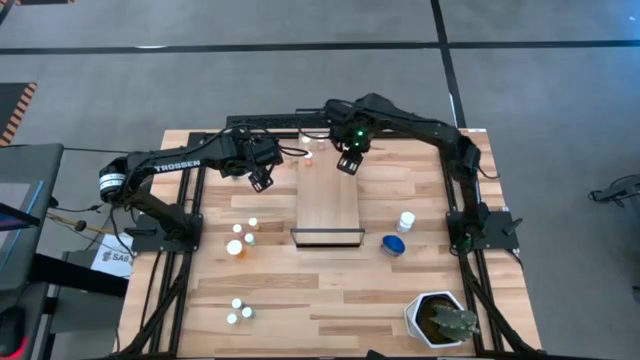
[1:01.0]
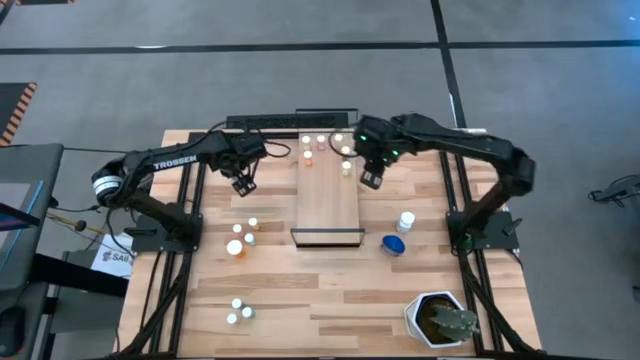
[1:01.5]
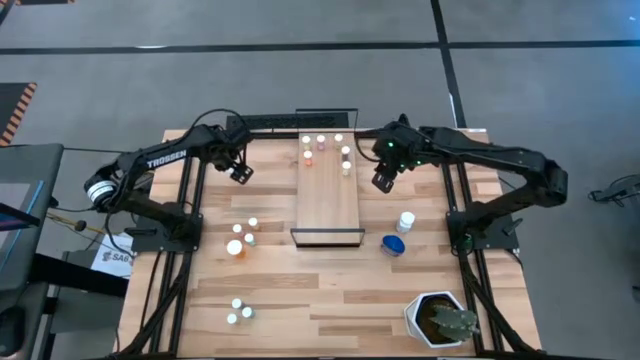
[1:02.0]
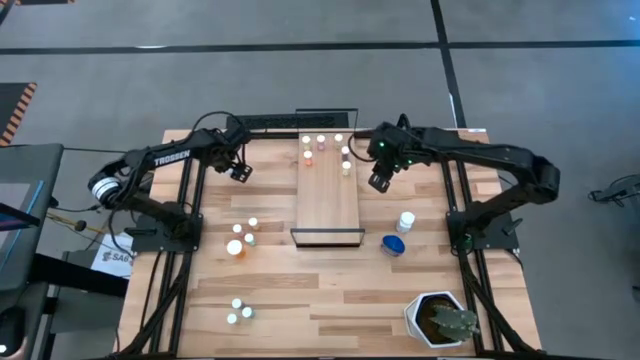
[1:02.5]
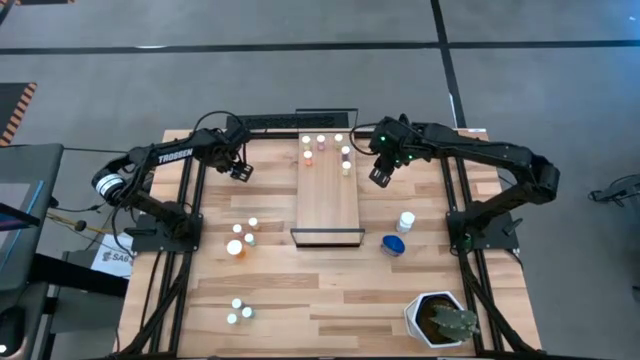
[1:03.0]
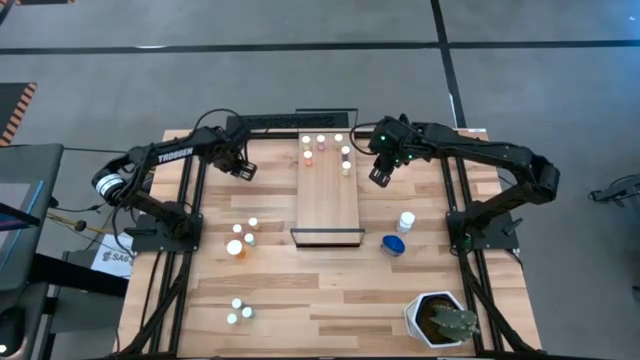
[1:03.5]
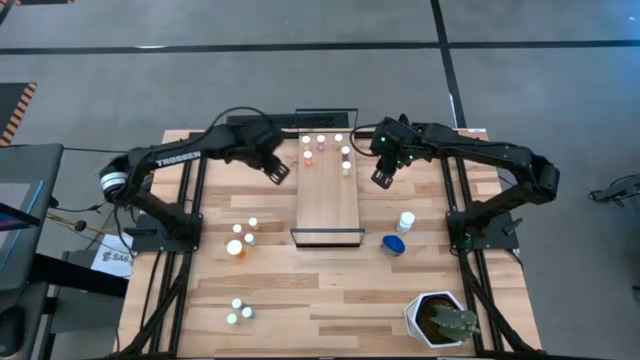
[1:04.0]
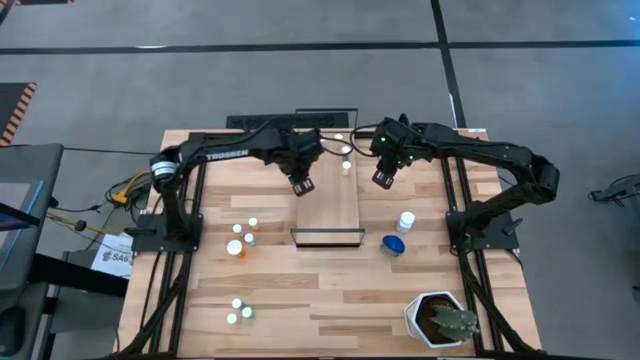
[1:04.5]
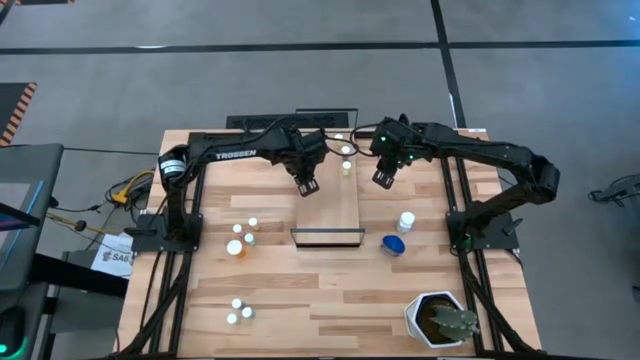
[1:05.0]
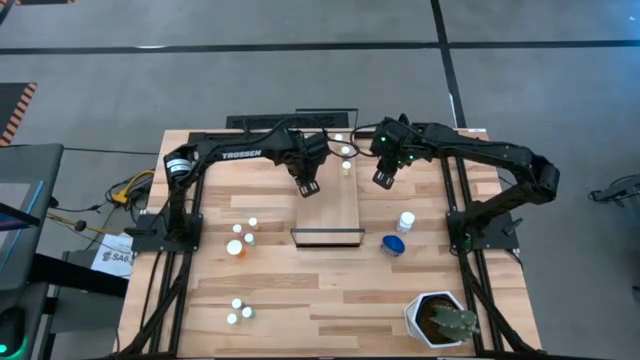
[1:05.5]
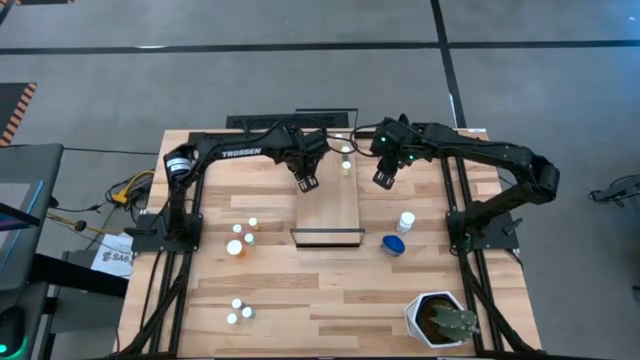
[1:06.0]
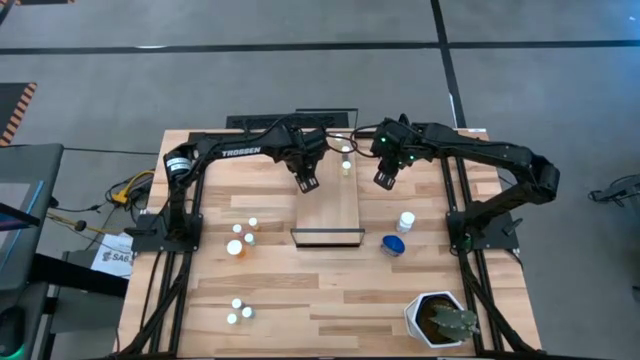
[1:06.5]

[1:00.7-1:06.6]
Task: Pick and place medicine bottles onto shelf by color
Put the blue pill bottle on the shelf

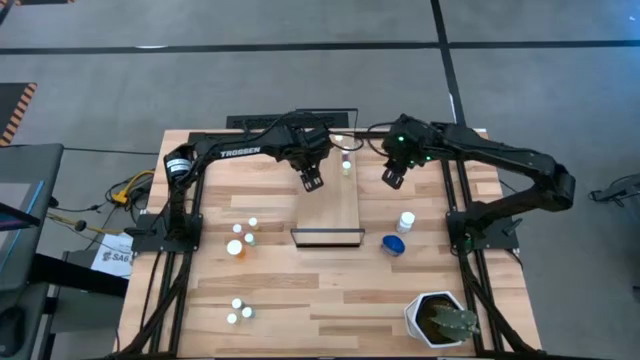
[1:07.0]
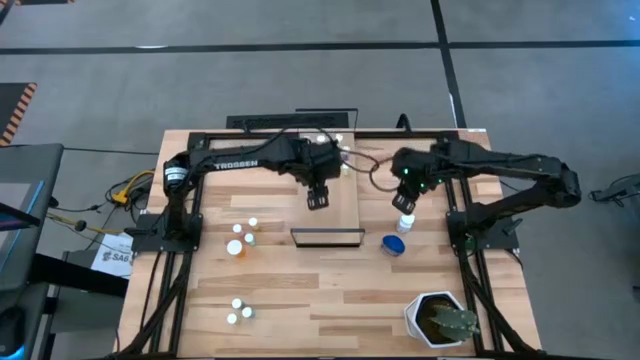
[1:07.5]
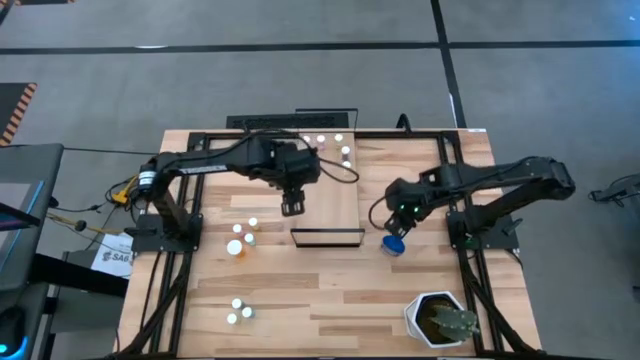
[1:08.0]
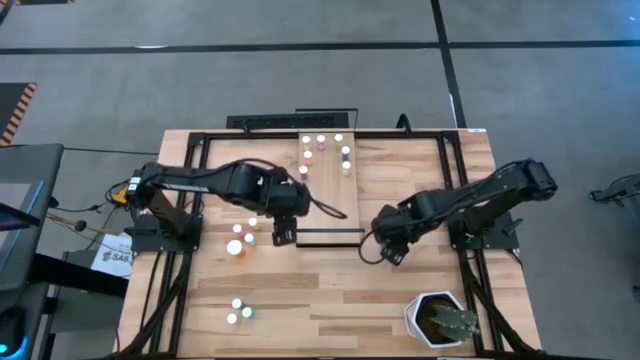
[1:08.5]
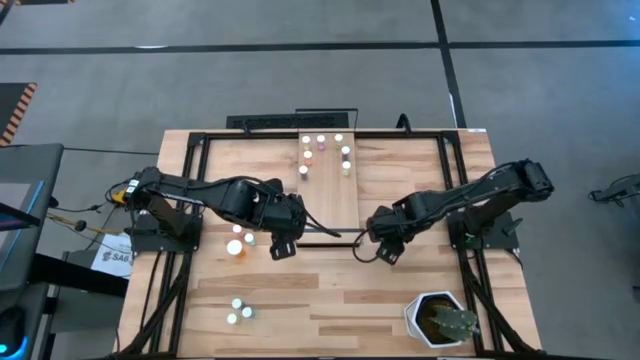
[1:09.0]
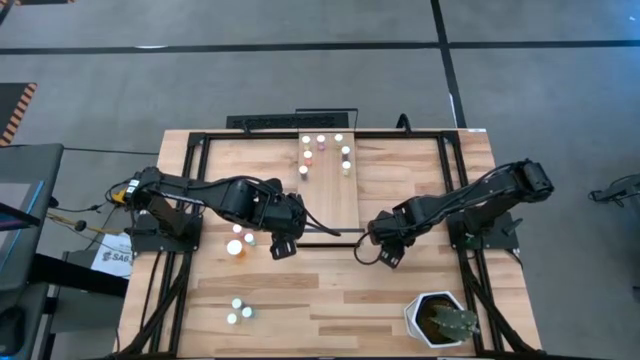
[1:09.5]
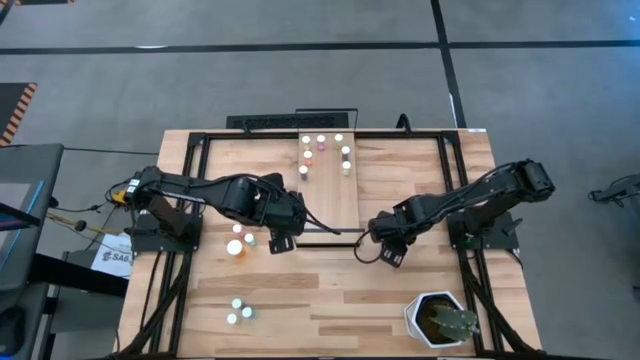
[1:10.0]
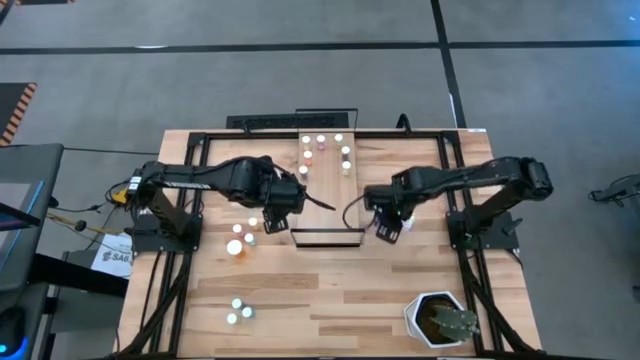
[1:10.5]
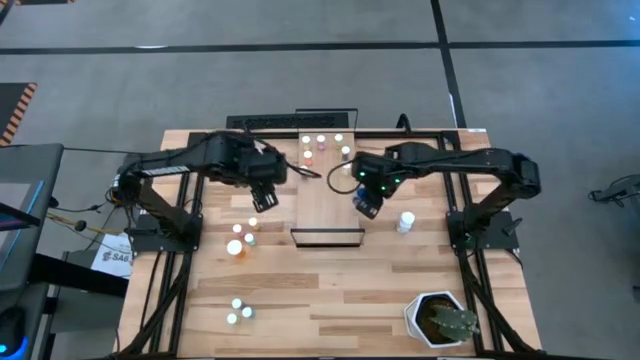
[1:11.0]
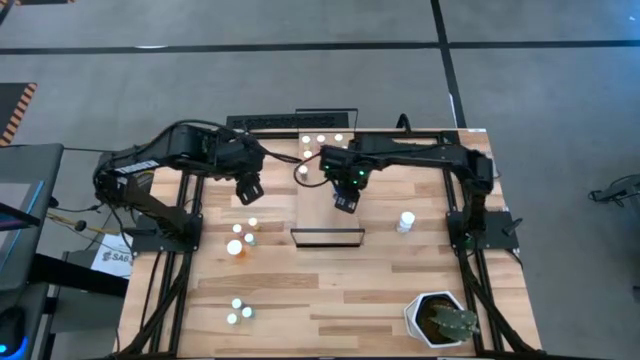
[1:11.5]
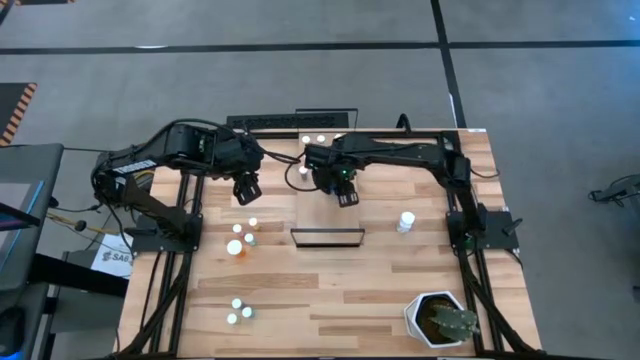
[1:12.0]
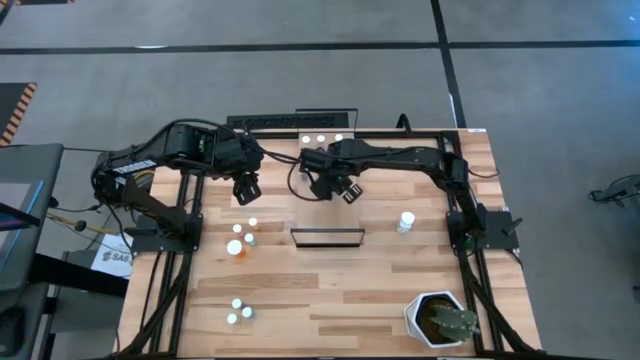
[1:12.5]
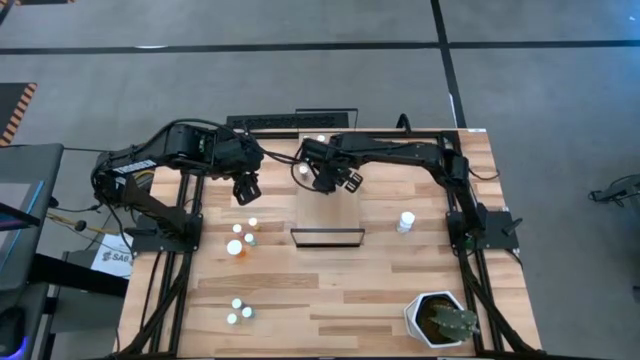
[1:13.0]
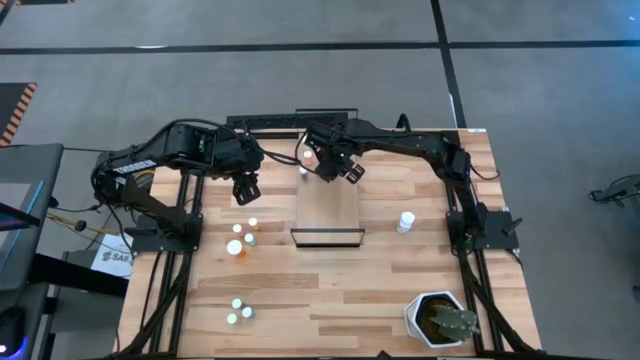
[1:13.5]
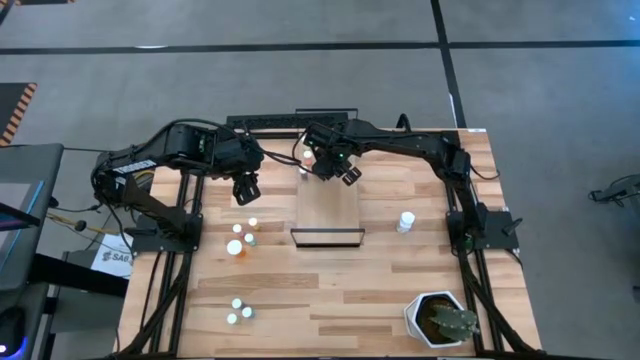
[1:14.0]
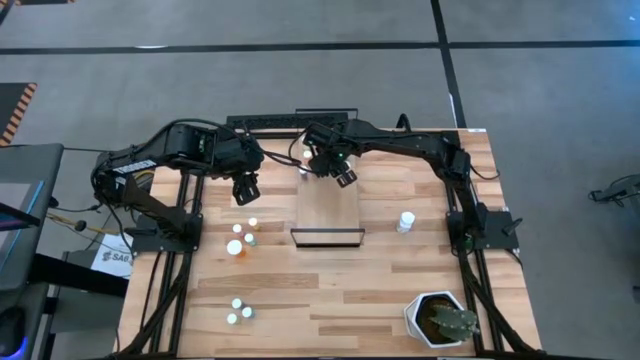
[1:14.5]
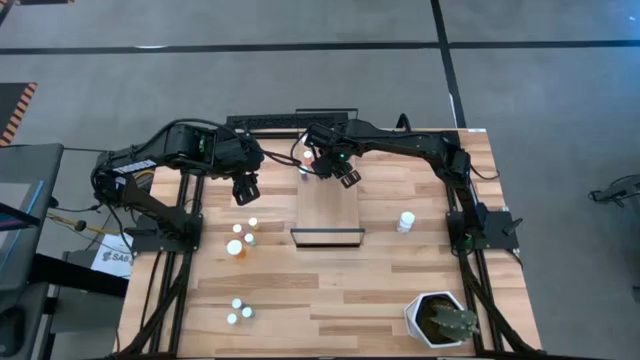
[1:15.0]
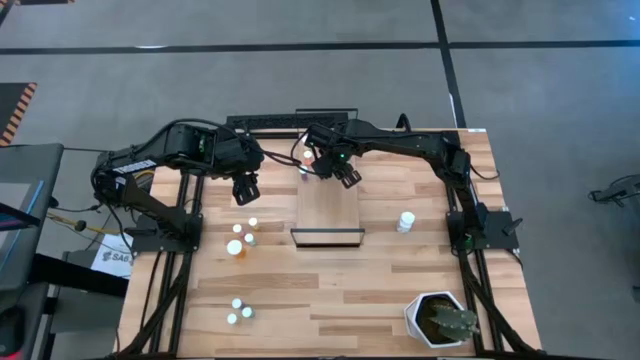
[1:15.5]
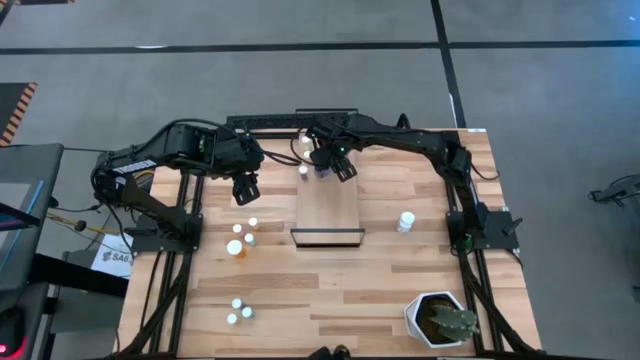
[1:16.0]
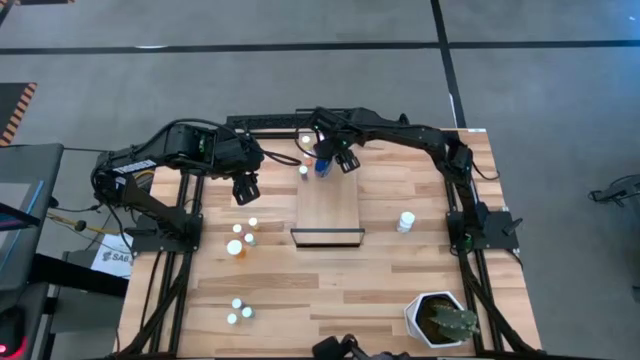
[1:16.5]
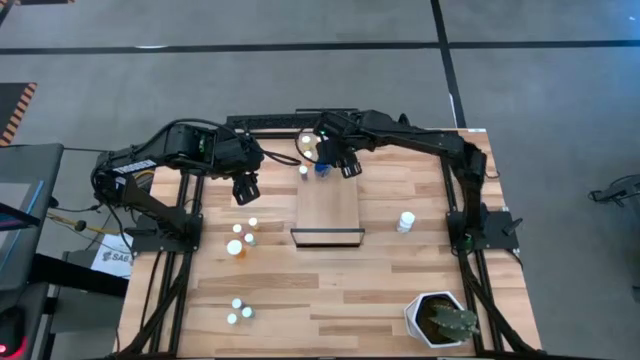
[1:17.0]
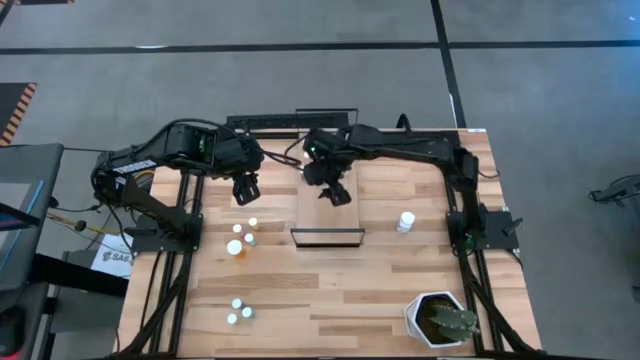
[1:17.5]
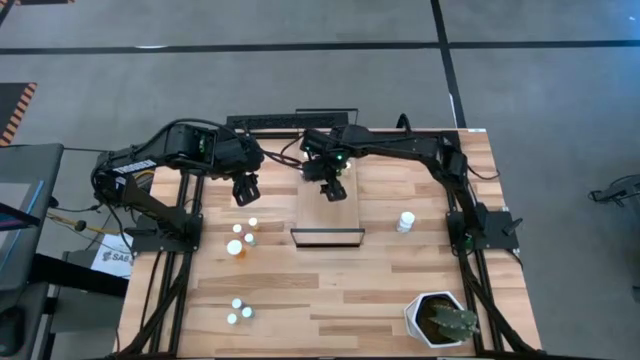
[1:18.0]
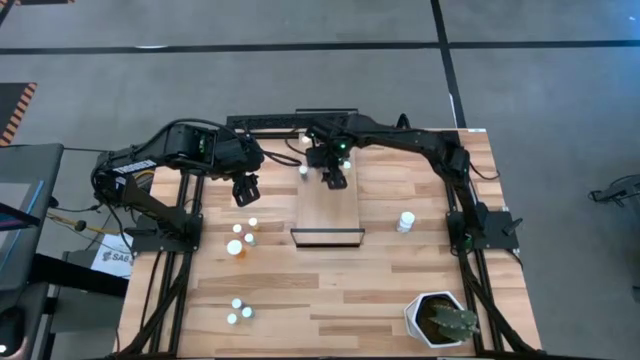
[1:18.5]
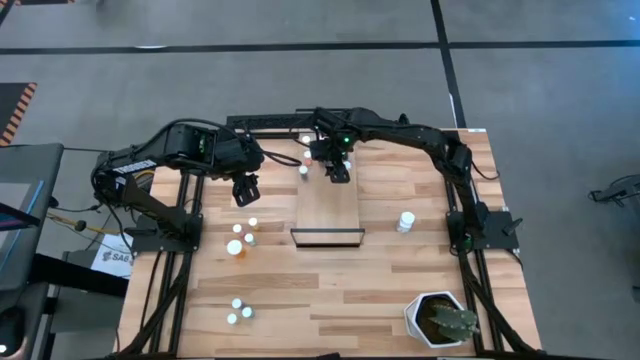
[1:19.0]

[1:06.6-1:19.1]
Put the big blue pill bottle on the shelf

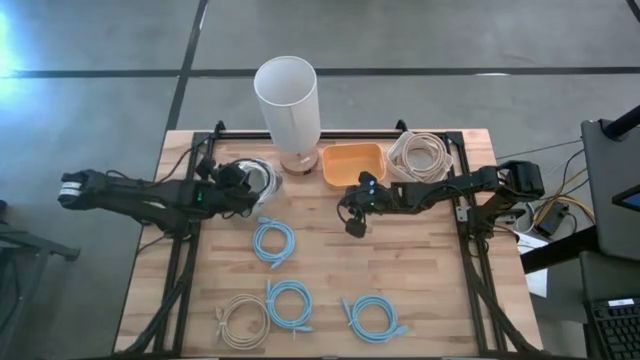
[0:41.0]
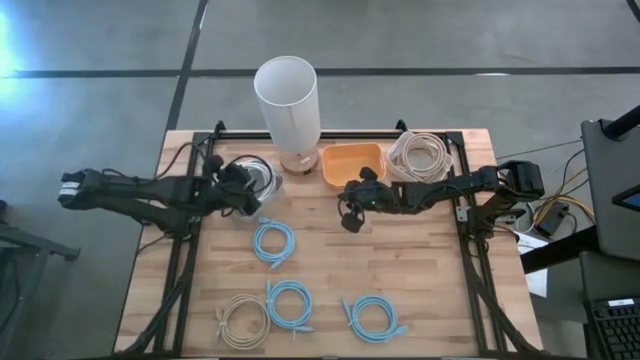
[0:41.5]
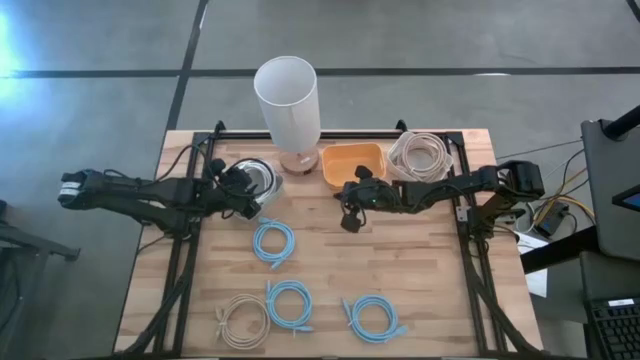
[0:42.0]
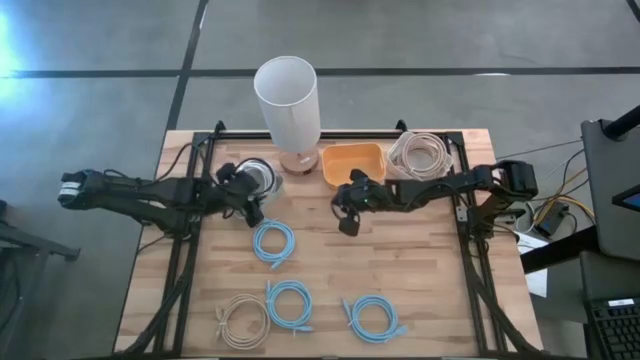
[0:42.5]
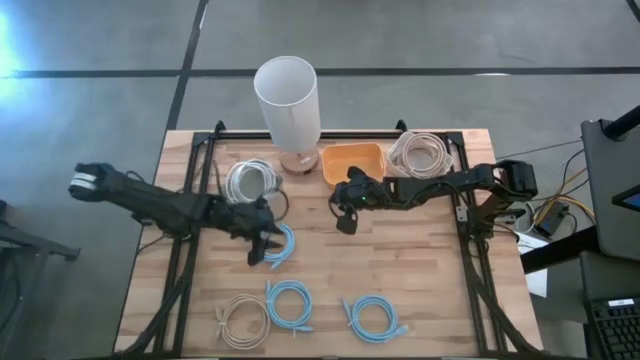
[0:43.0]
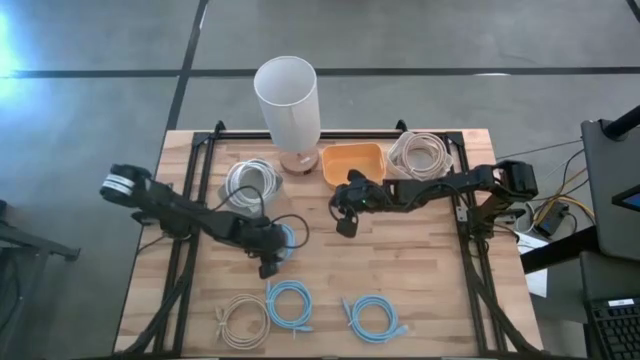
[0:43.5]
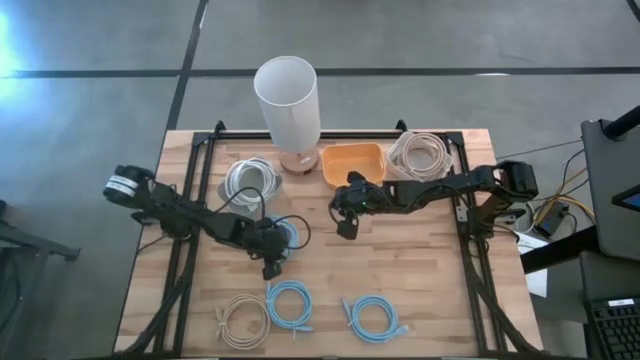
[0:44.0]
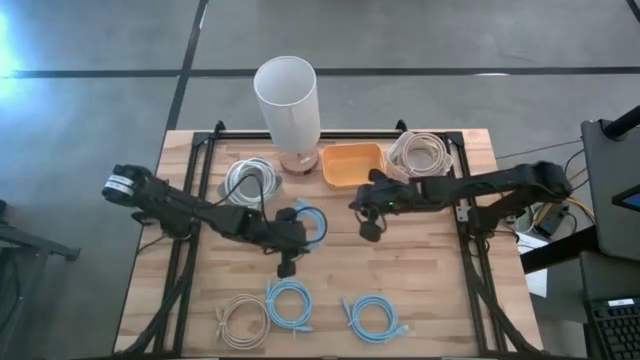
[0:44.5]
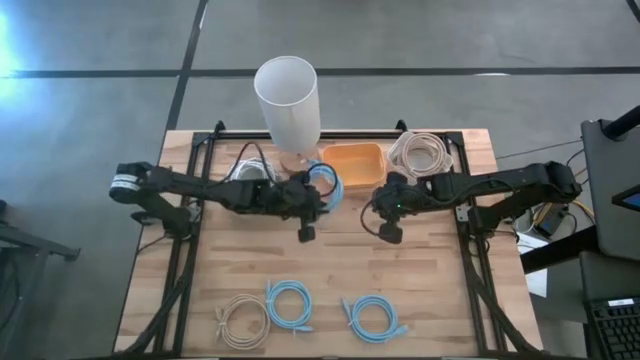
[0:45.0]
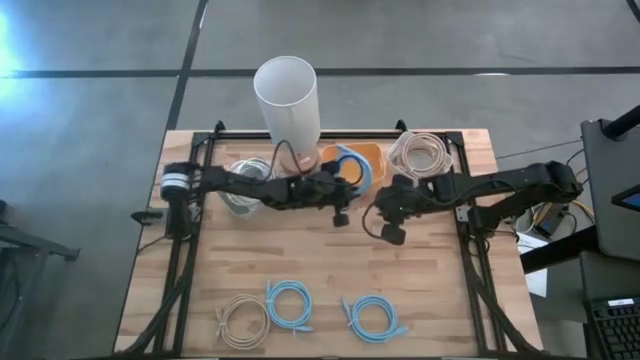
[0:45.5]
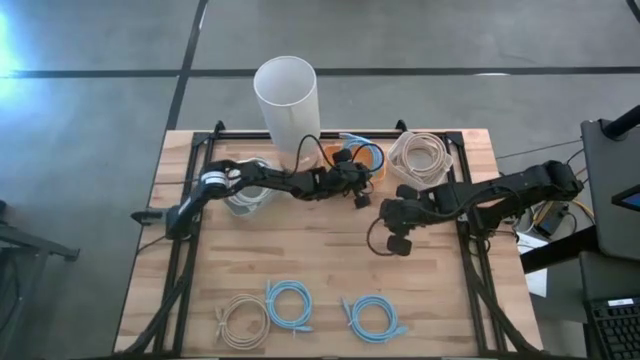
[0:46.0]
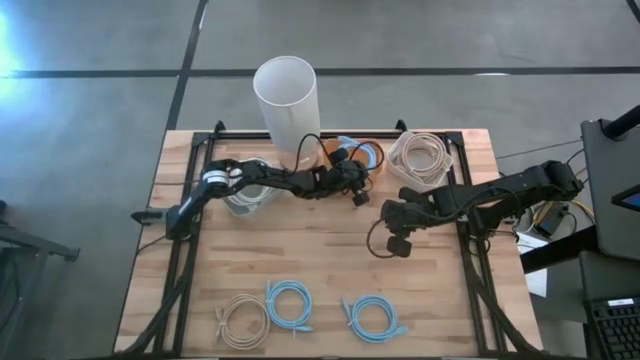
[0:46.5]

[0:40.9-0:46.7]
Task: Sort HDMI cables
Put the top blue HDMI into the yellow bin
